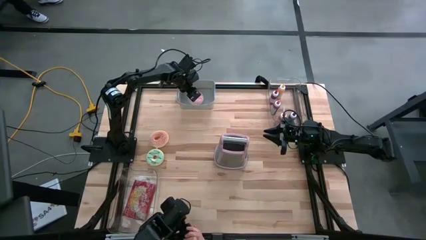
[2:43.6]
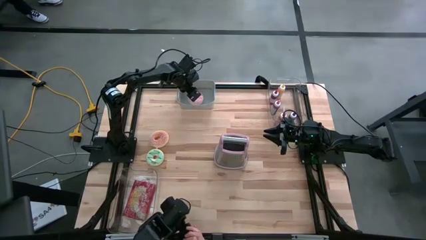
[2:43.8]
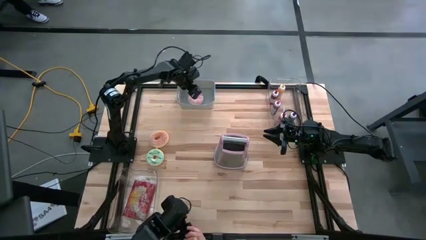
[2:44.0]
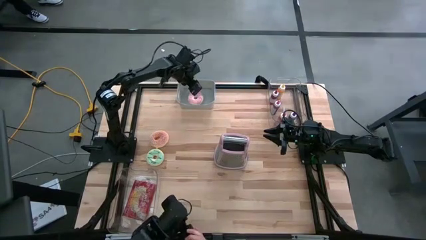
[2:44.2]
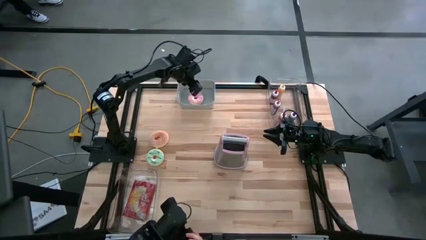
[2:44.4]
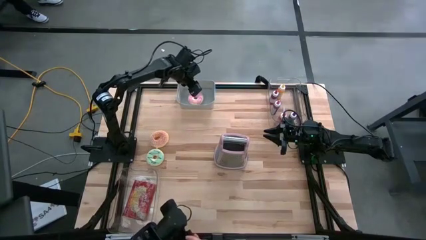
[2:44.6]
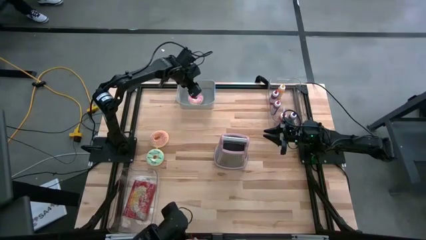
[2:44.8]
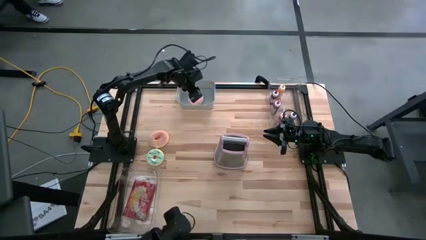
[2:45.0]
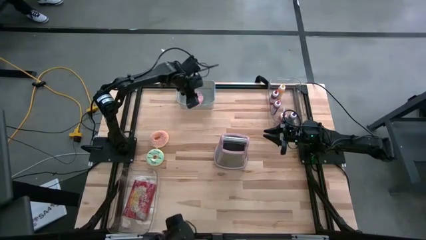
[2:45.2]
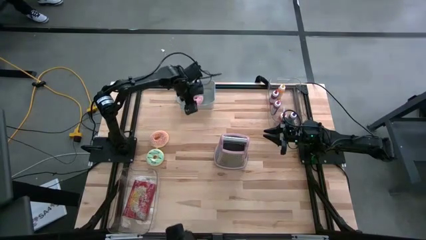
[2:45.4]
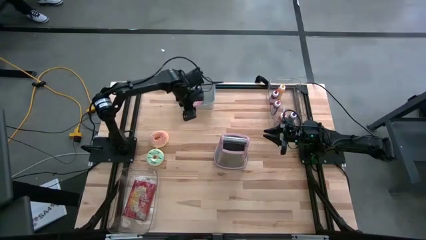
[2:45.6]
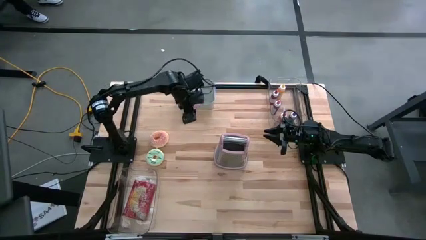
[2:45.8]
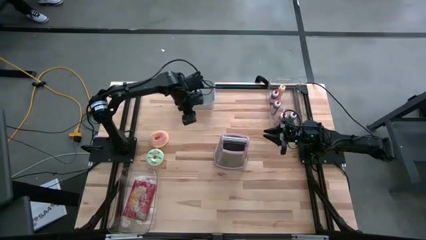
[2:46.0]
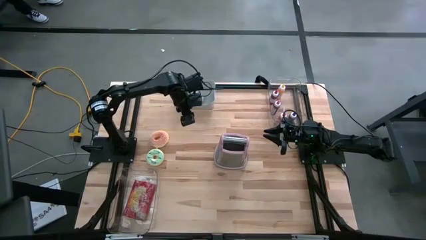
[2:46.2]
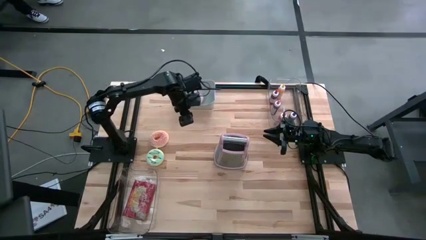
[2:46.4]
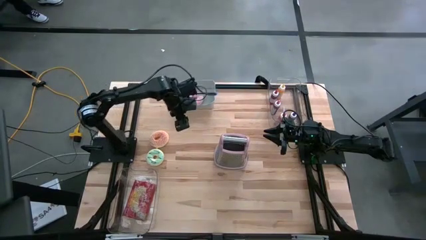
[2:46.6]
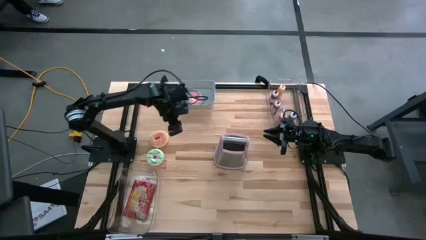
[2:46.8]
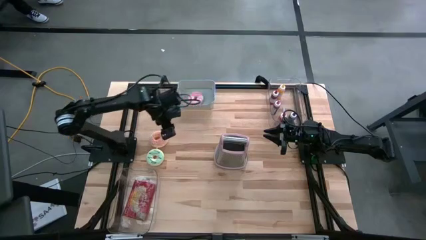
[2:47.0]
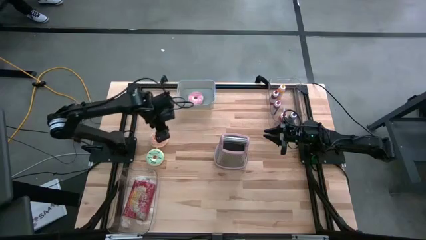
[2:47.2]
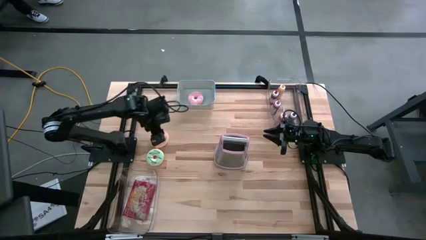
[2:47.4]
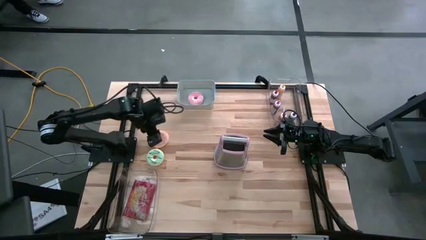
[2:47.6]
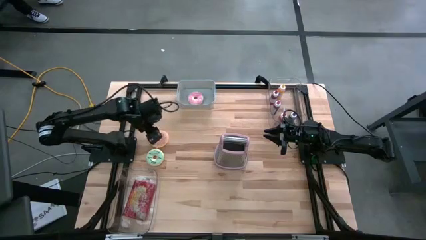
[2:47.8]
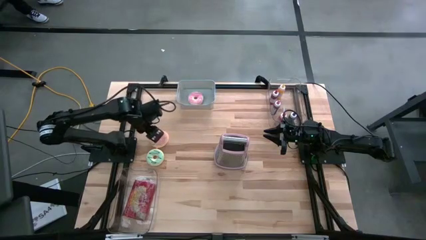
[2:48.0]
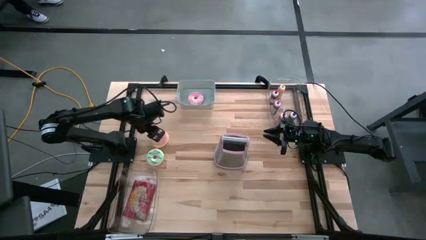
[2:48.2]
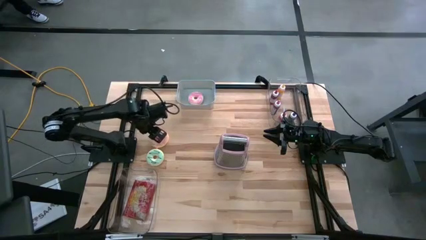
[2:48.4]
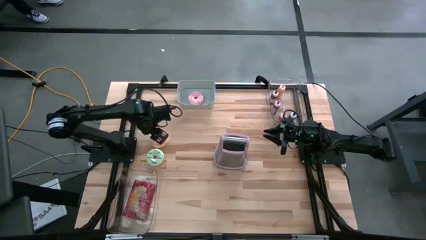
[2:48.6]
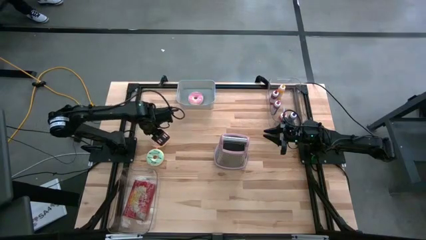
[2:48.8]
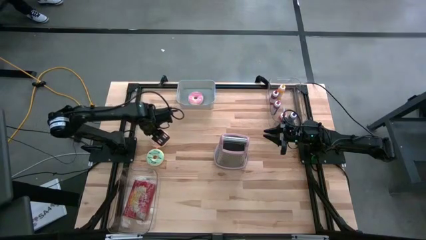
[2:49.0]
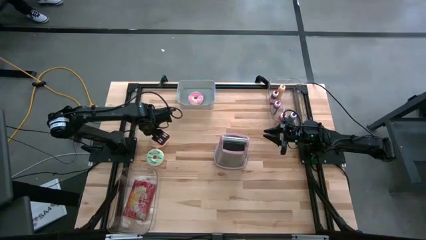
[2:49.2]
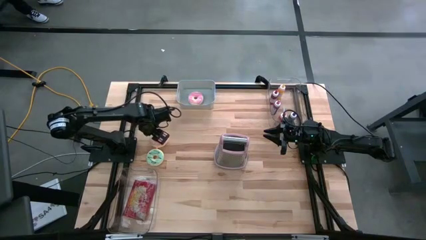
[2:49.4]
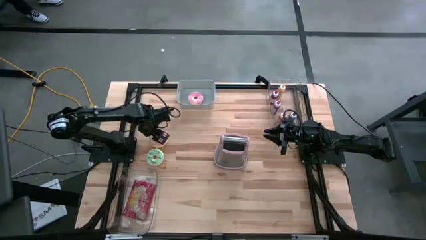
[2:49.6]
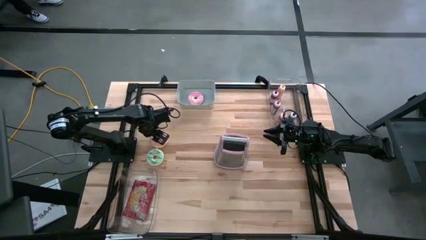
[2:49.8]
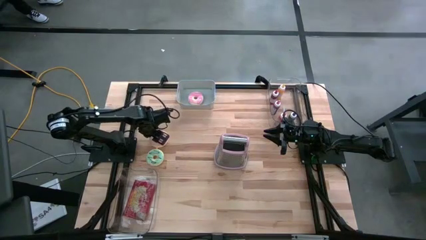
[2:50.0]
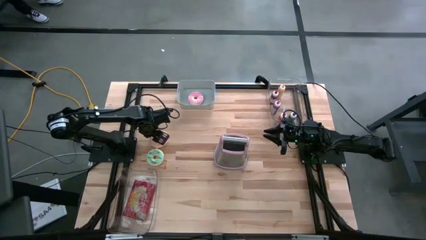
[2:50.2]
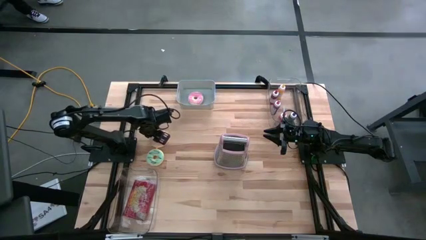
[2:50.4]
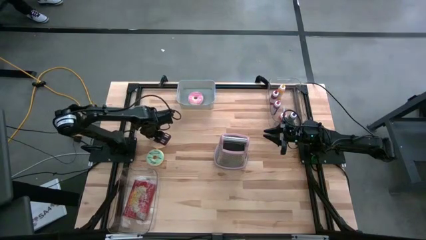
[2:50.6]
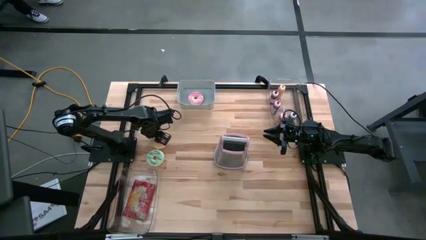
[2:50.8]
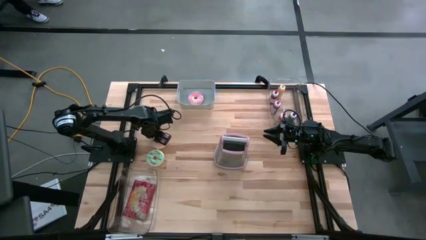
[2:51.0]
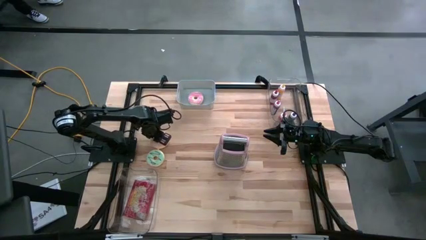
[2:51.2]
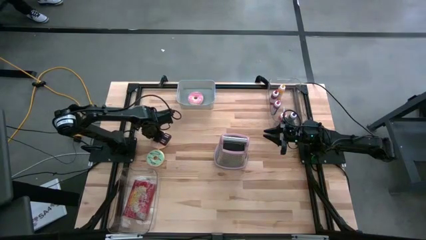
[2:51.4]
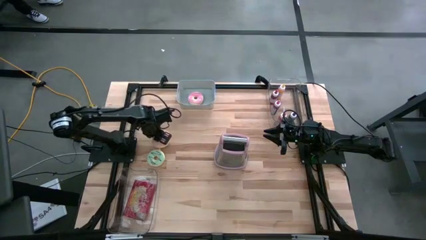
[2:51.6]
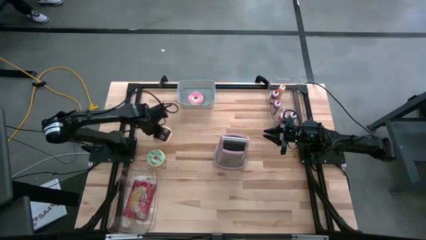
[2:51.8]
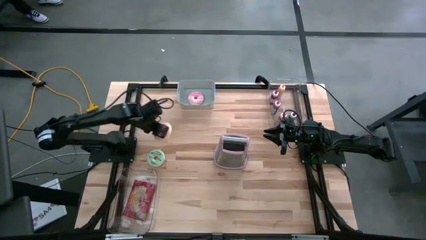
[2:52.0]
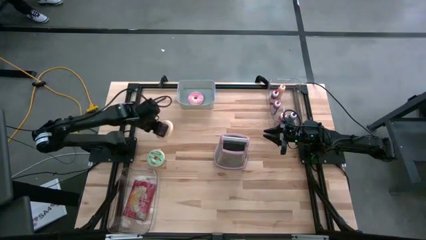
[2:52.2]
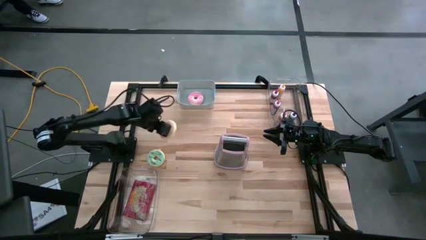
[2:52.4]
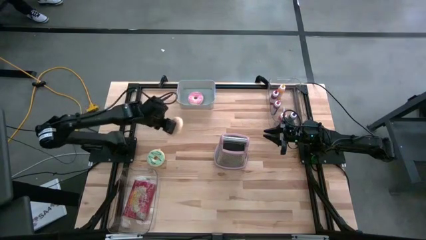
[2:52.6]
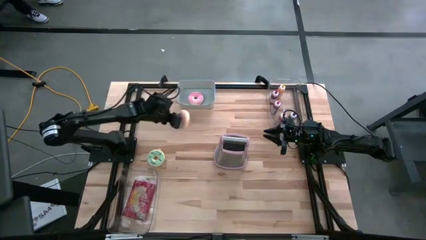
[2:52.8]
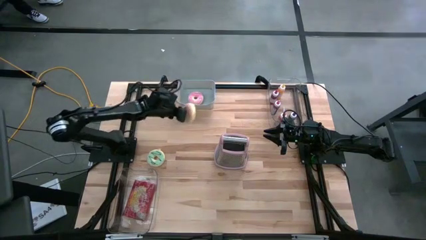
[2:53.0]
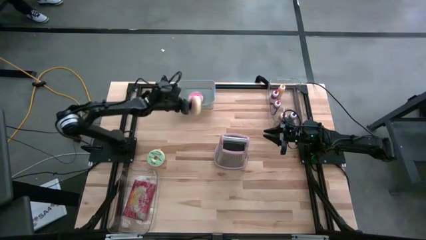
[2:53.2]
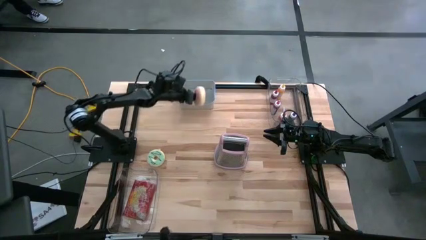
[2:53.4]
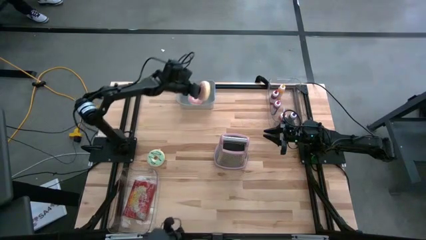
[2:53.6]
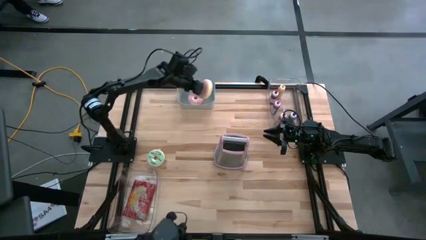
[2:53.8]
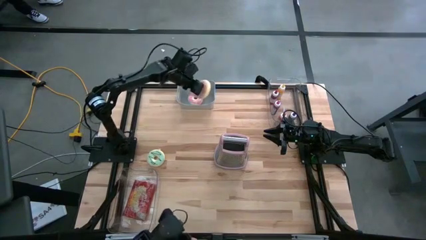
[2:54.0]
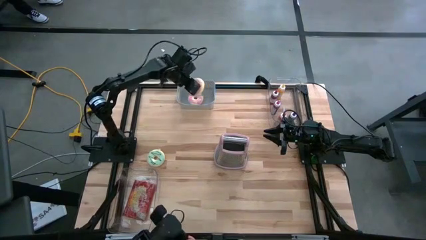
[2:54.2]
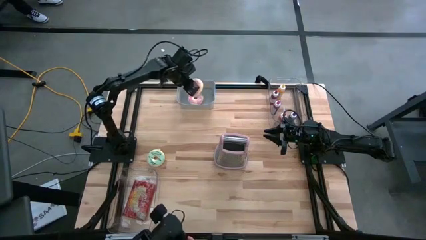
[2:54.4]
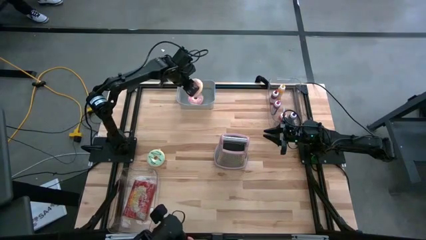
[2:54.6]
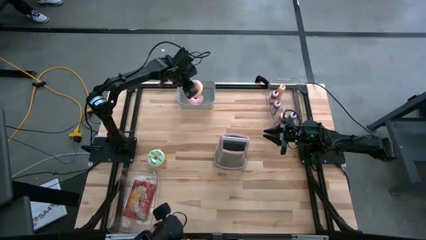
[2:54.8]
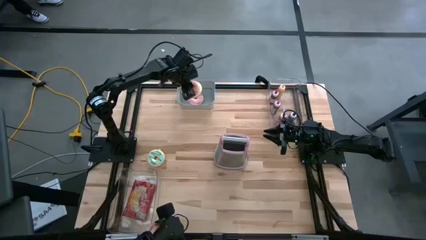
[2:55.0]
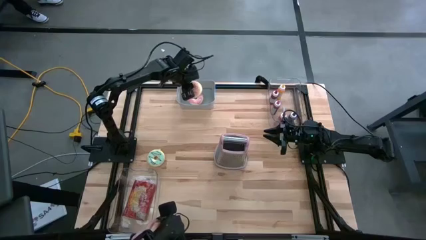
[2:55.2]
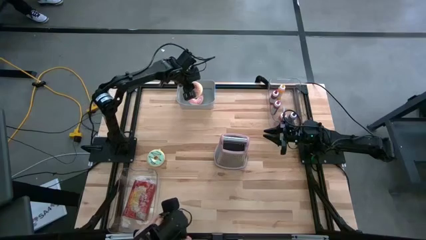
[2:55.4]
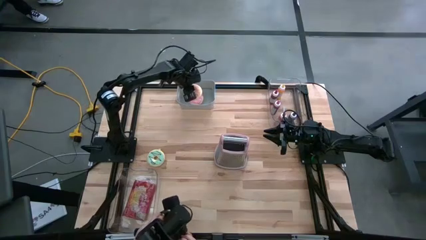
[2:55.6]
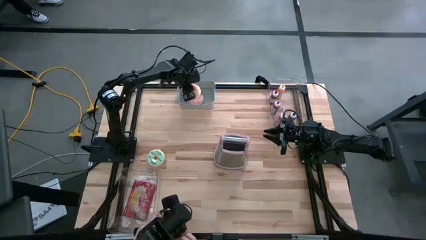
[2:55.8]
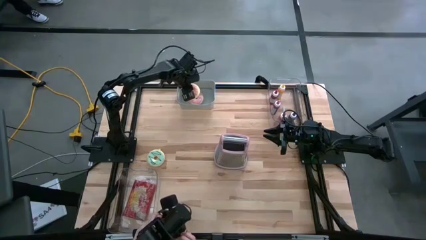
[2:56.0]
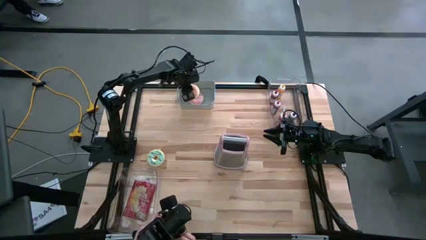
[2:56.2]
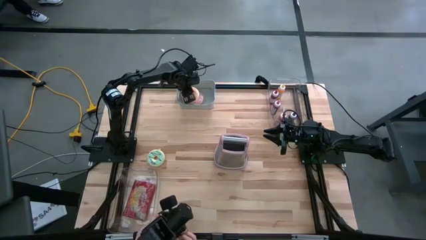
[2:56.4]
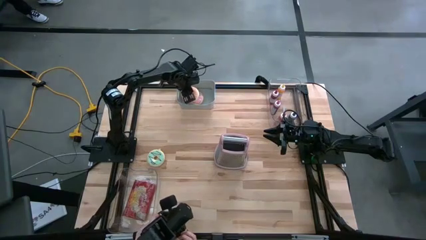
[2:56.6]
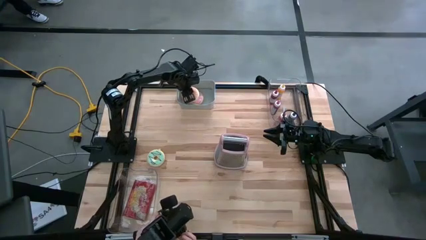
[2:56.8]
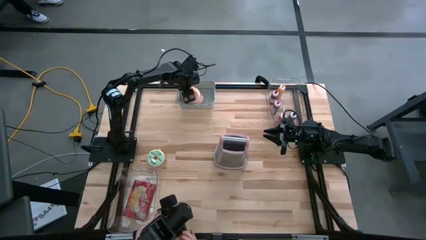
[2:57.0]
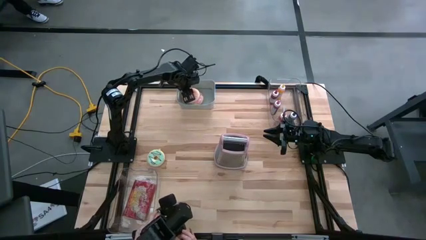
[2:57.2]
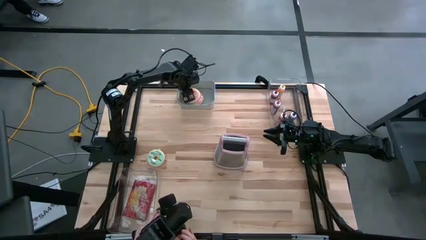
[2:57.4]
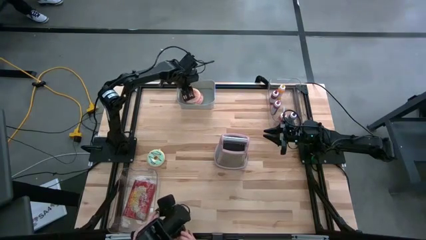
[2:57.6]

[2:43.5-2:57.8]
Put the orange donut into the gray bin
